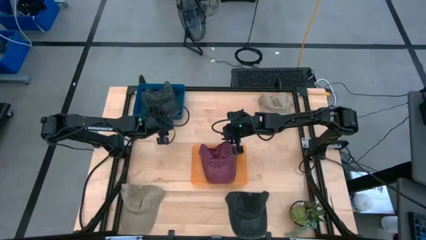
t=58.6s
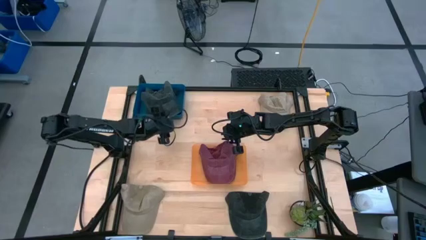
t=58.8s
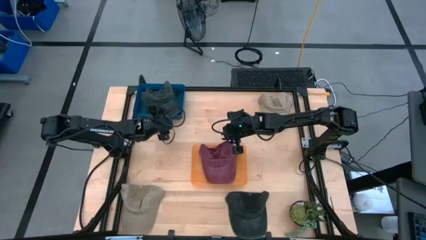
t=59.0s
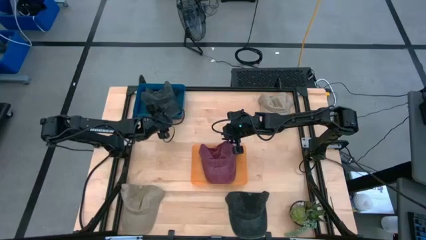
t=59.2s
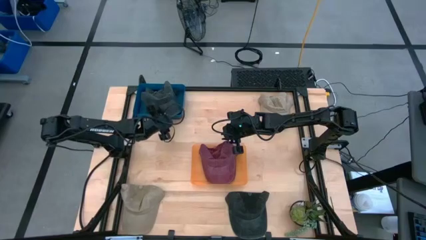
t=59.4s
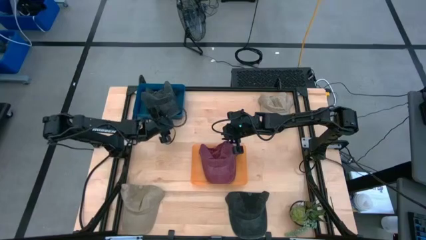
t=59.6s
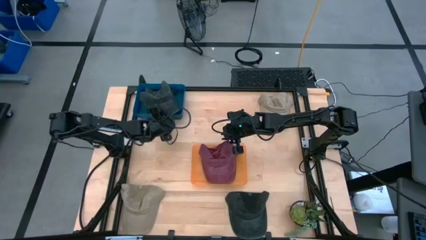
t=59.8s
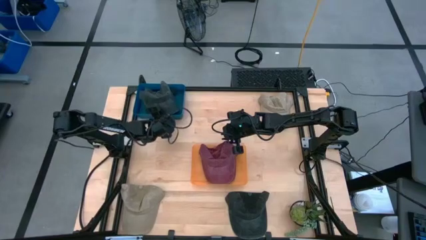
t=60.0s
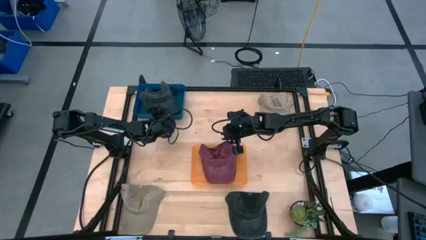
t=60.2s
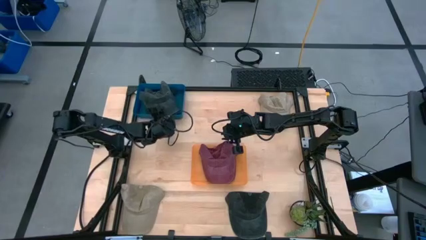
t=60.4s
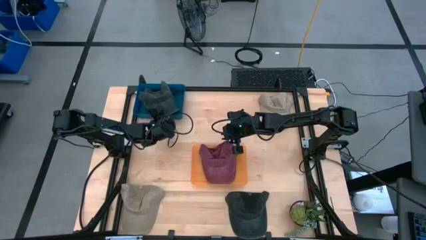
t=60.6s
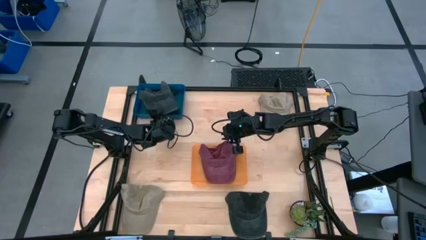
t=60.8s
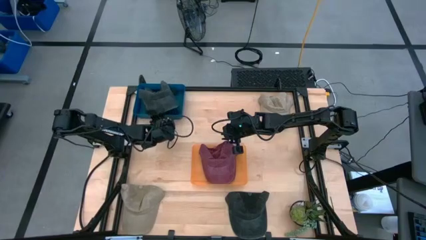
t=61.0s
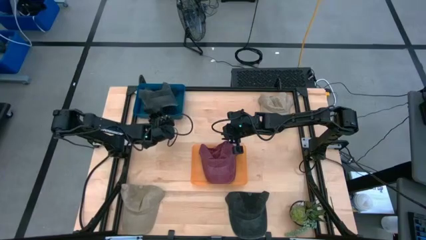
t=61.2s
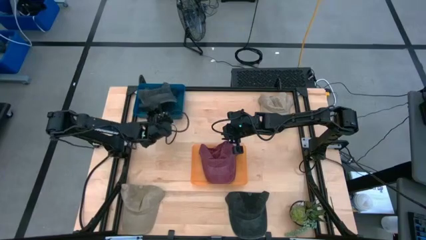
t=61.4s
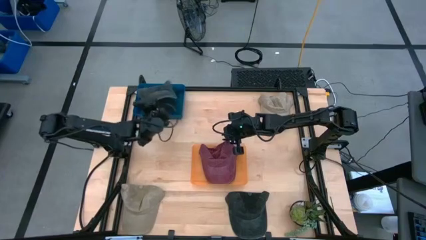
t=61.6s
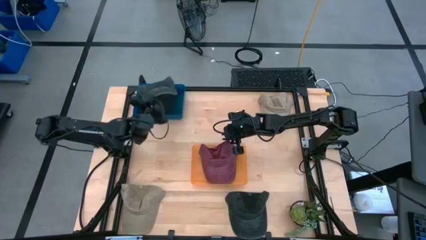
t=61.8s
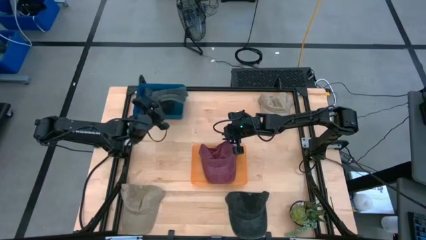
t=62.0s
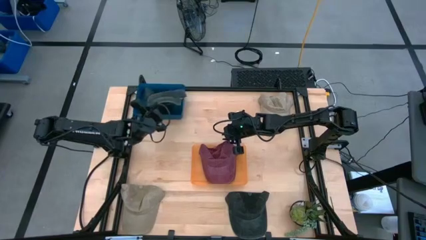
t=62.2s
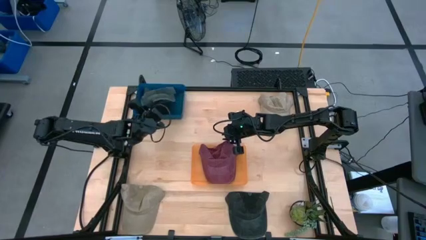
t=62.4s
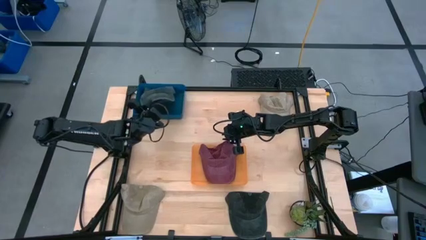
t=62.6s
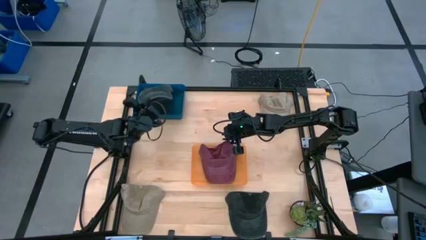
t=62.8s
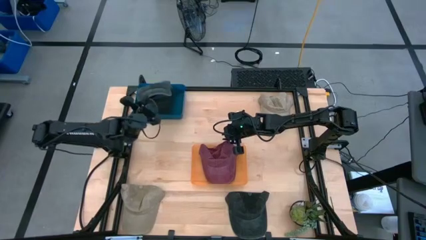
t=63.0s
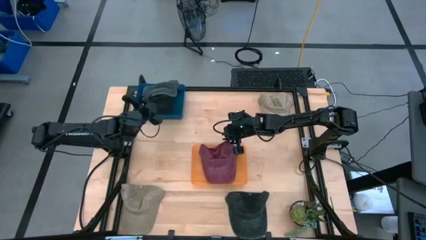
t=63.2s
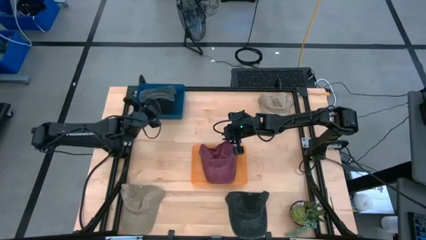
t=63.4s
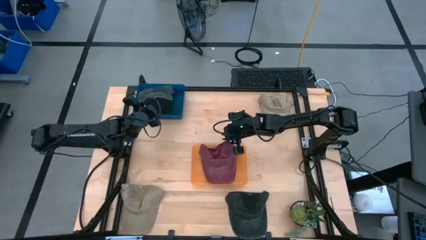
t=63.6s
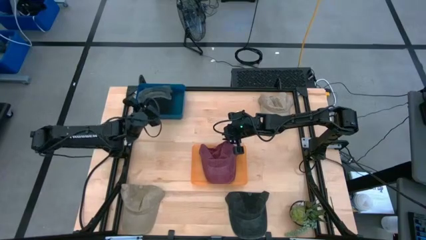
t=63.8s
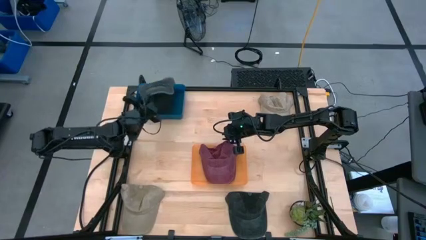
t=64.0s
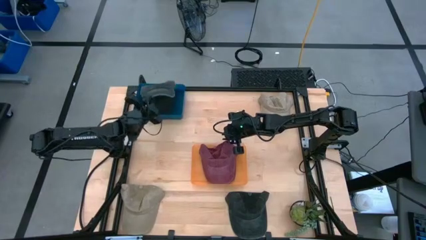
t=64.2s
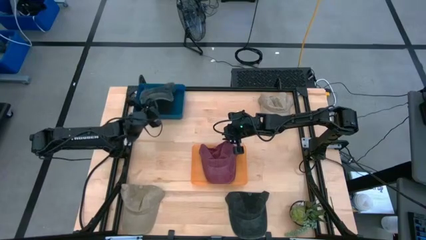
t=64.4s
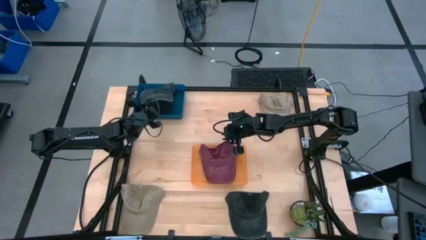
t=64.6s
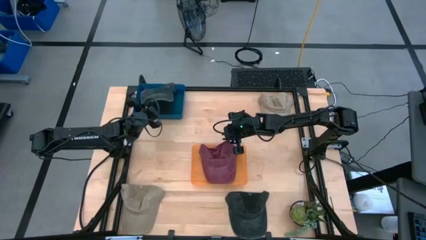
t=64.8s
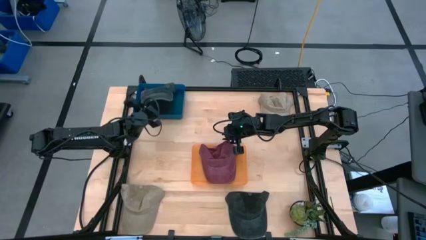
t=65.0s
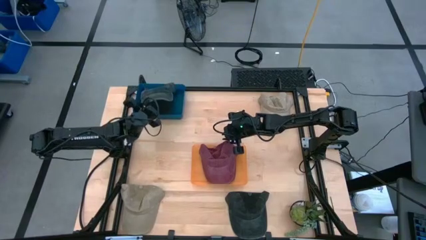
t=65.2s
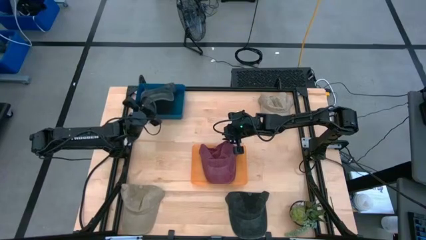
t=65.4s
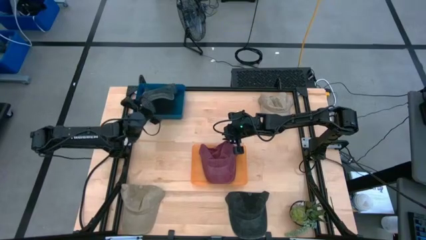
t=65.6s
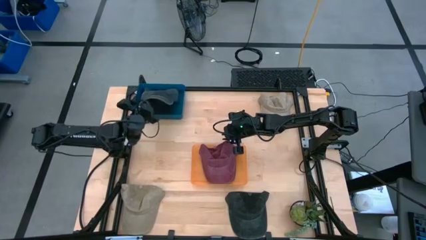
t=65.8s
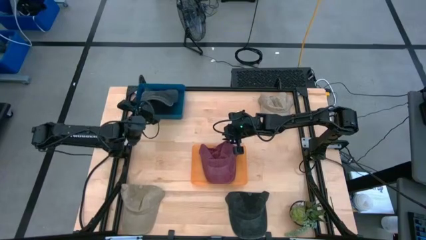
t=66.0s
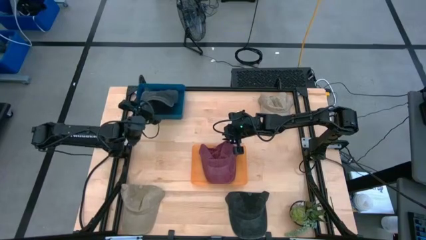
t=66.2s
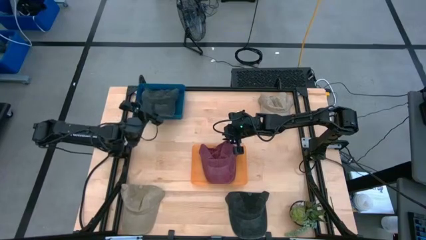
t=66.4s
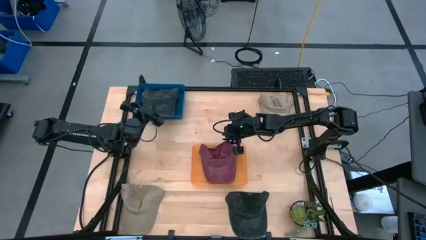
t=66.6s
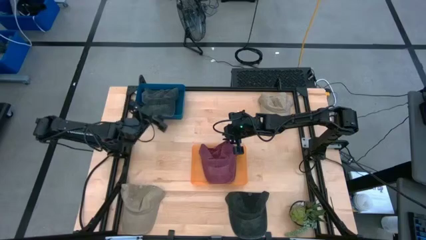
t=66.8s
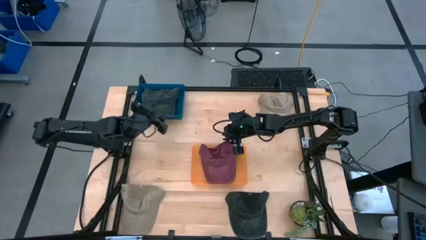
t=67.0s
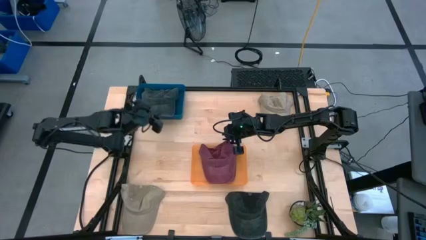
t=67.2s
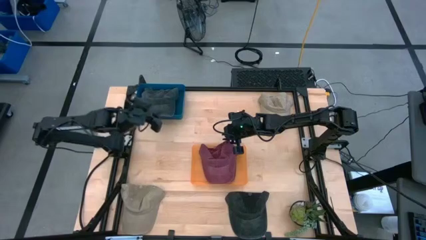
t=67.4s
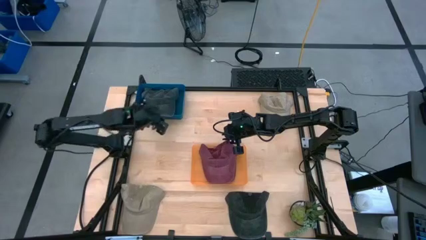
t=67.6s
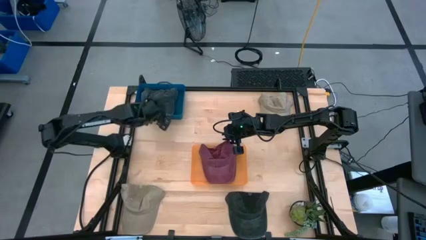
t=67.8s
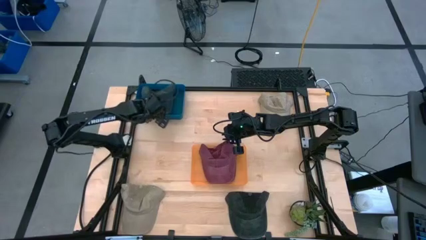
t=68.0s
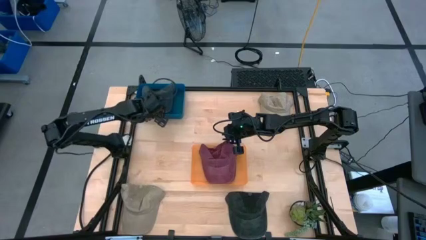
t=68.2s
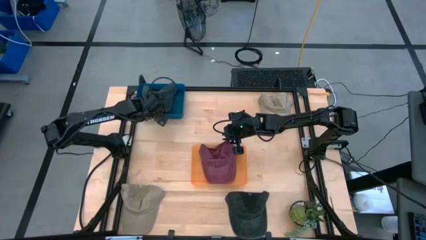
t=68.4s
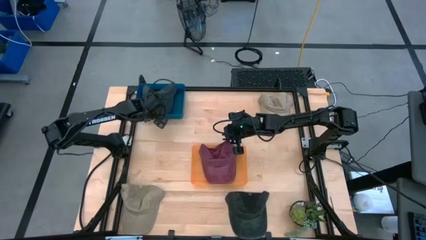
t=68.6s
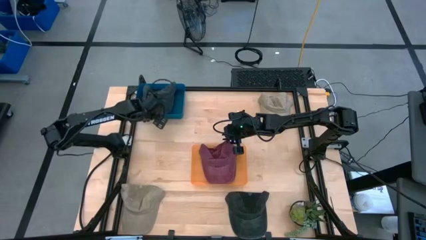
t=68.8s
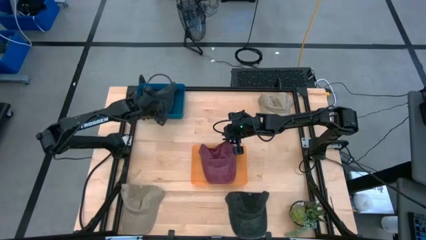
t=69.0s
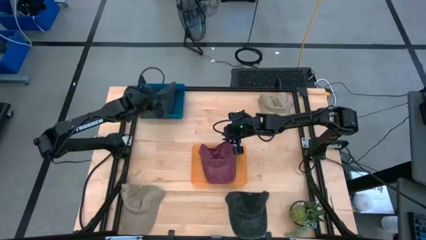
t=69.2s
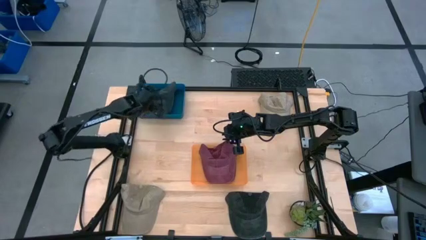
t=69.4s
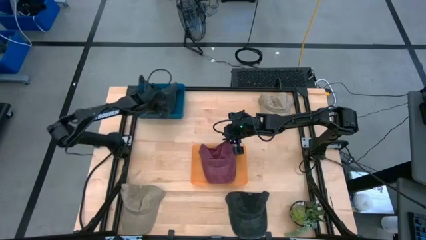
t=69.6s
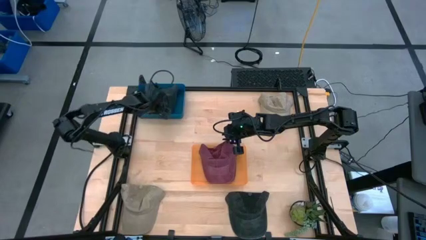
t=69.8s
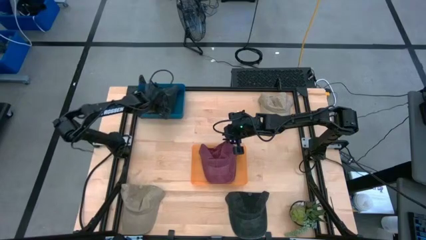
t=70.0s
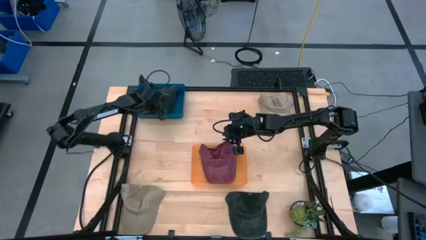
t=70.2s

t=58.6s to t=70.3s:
Task: Pick & Place hat
Put the top black cap into the blue bin

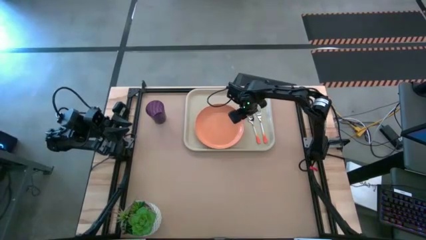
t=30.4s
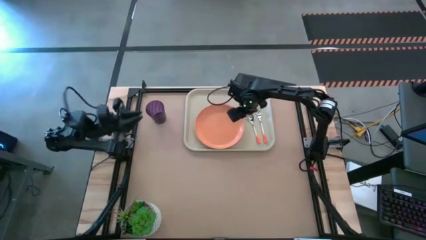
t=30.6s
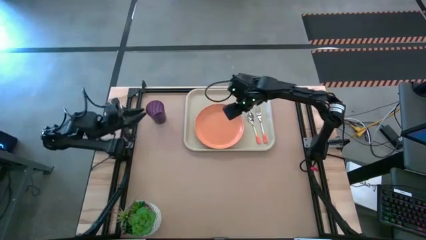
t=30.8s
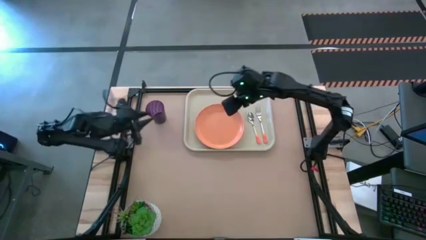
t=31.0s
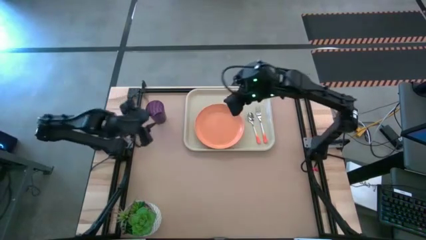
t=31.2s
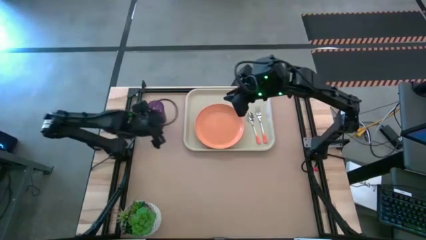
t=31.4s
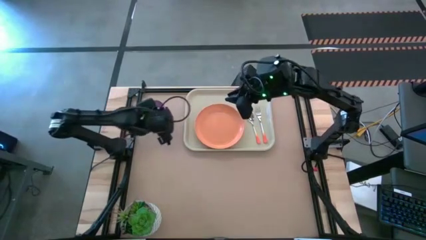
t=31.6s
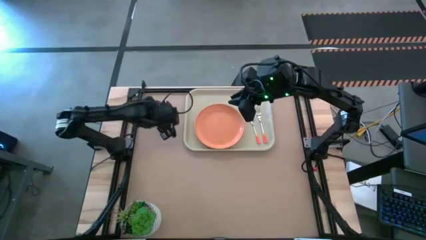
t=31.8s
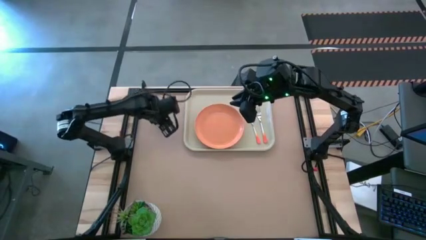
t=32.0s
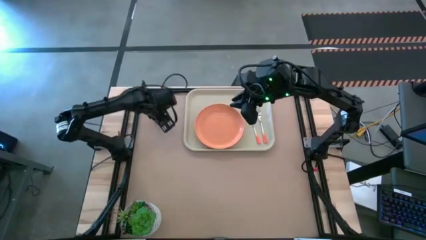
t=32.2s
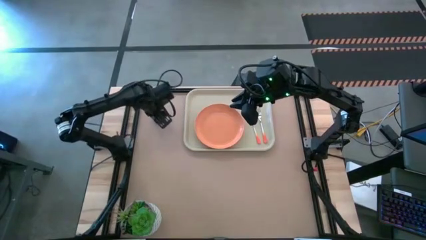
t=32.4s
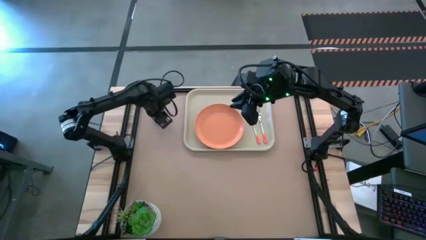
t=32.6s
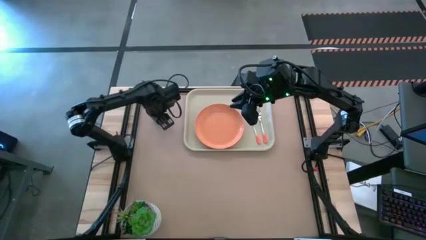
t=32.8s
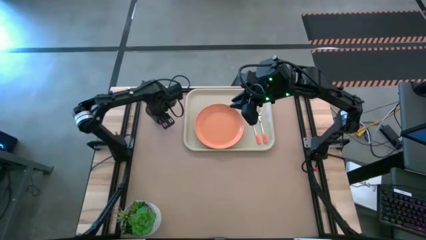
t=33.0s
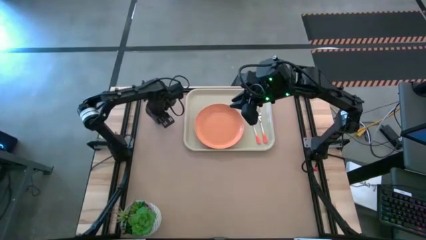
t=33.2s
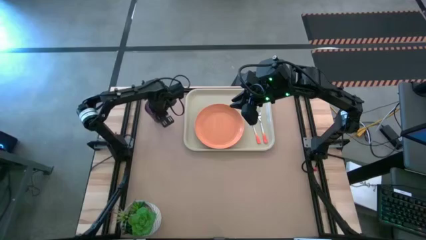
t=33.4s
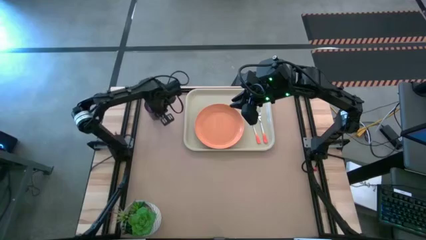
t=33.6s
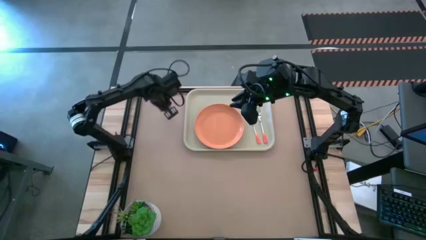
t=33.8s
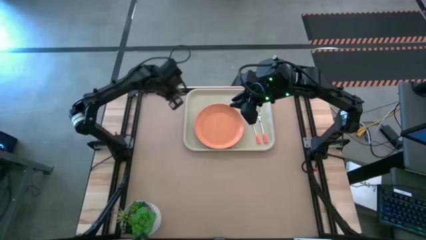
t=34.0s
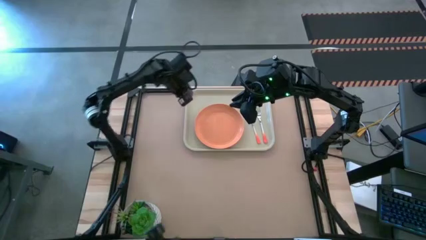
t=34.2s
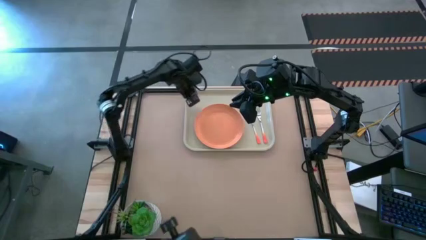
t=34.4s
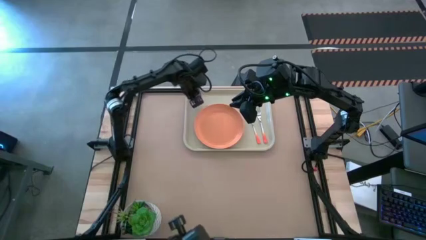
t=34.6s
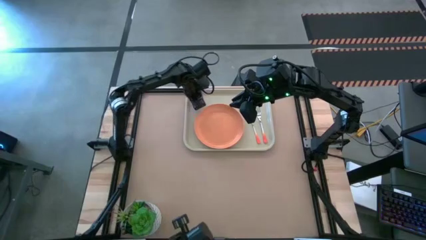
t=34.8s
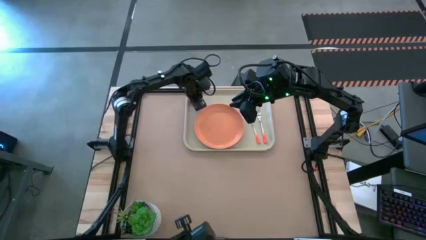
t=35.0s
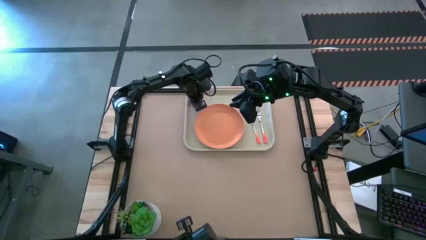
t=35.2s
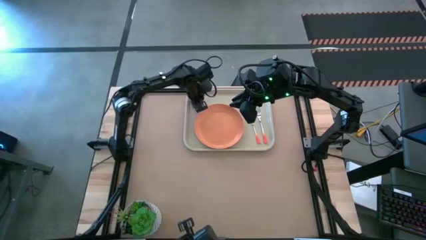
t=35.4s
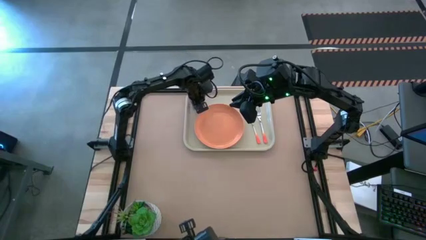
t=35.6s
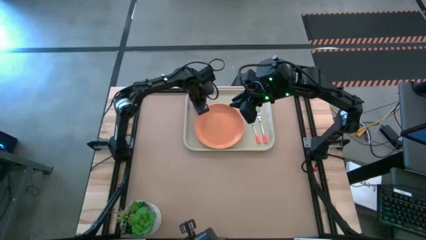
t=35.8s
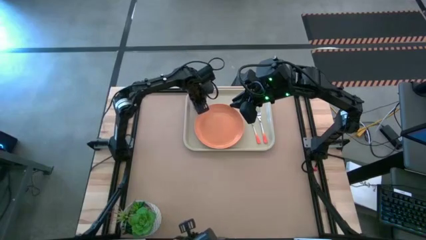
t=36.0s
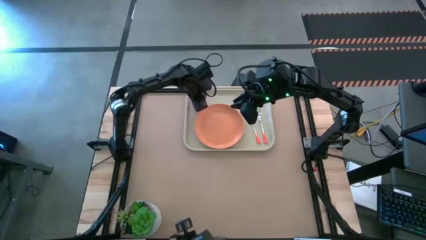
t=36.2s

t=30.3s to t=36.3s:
Task: Pick and place plate/cup/fork/spoon on tray
Put the violet cup in the top-left corner of the white tray
